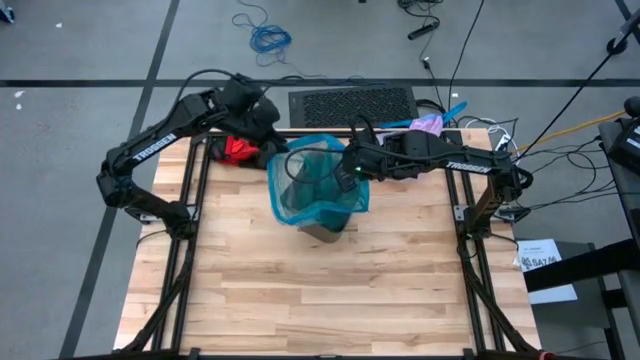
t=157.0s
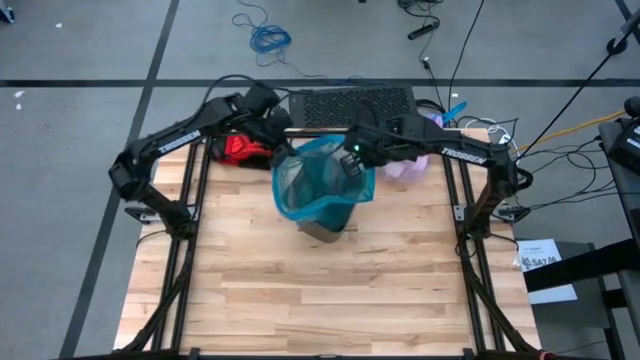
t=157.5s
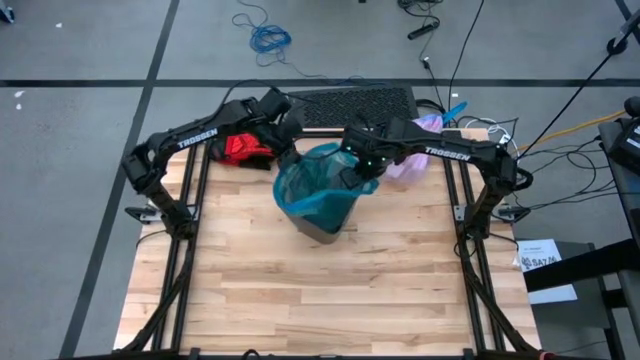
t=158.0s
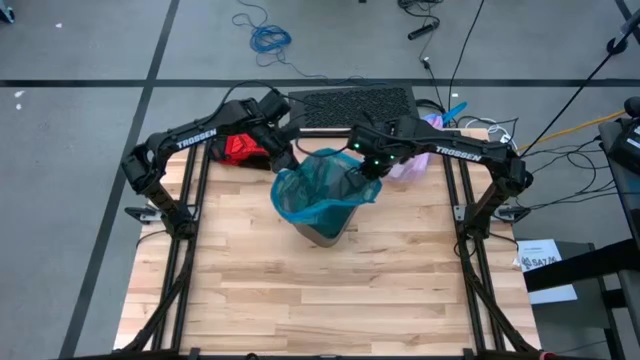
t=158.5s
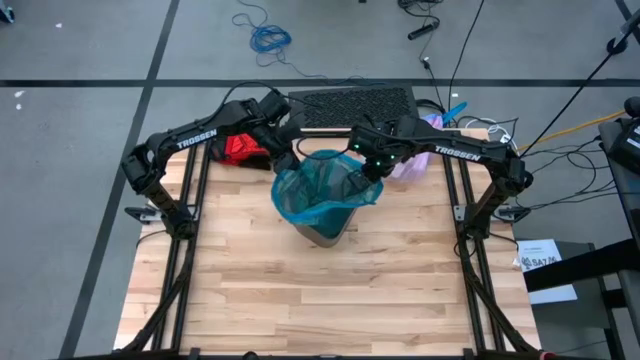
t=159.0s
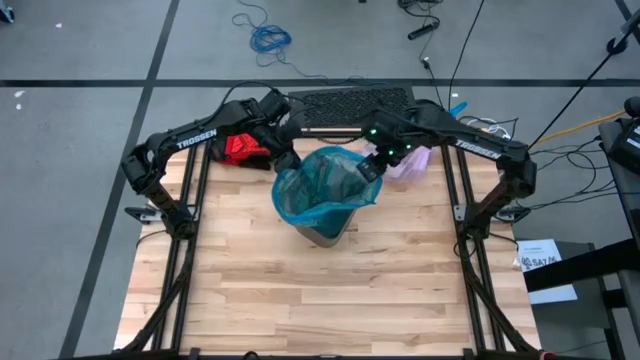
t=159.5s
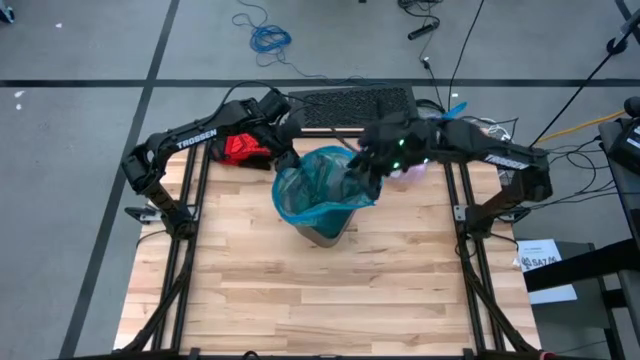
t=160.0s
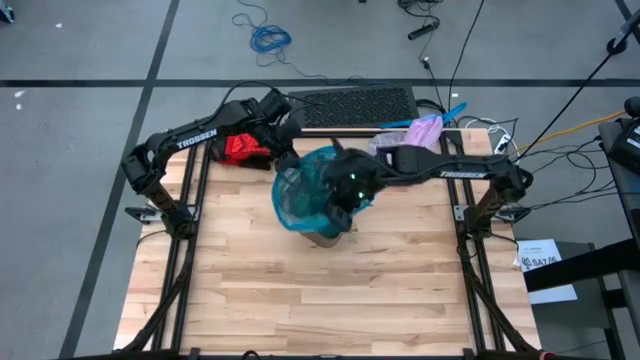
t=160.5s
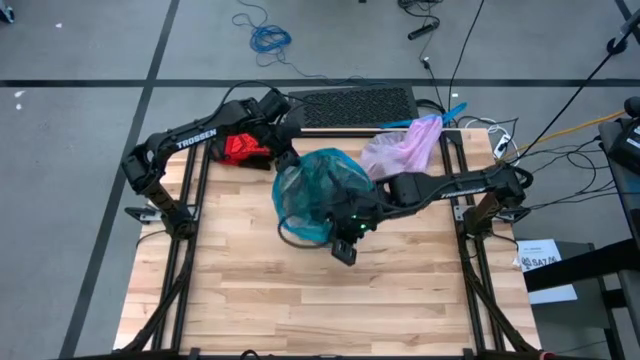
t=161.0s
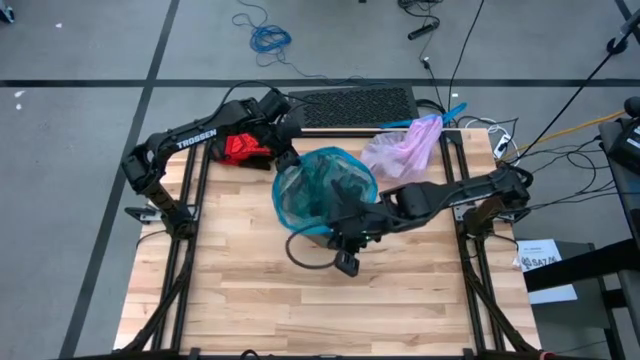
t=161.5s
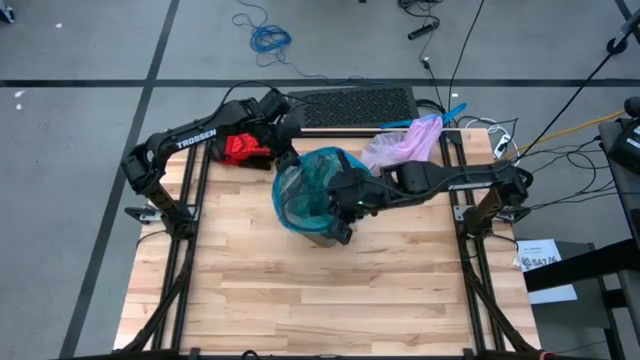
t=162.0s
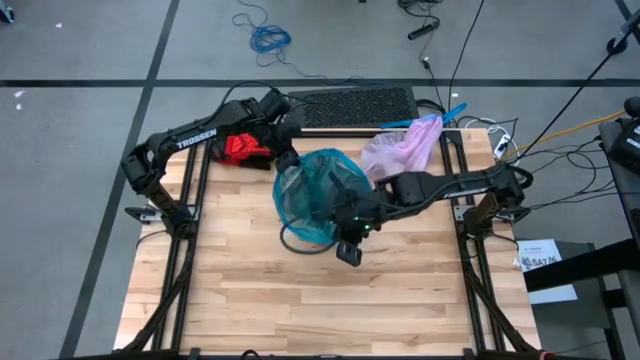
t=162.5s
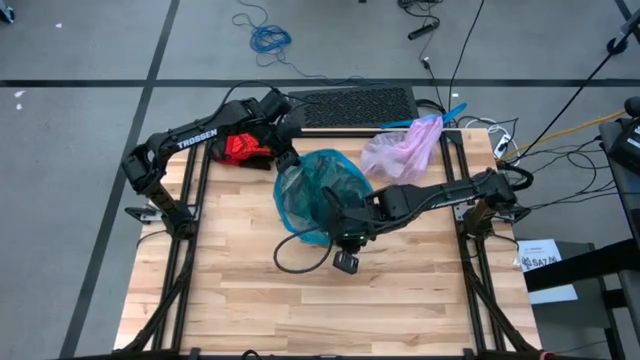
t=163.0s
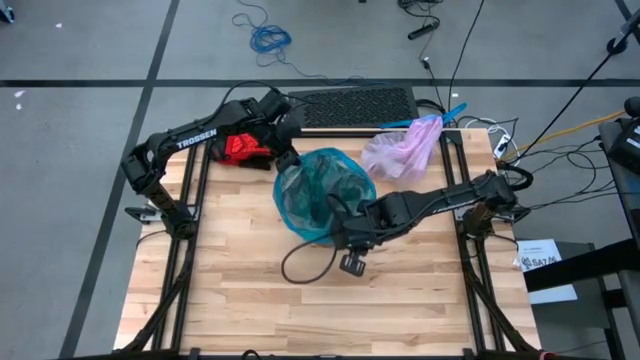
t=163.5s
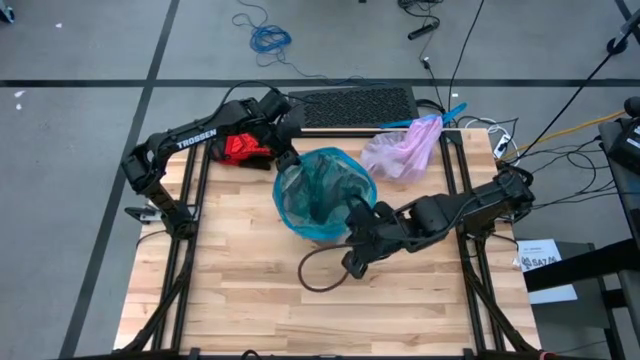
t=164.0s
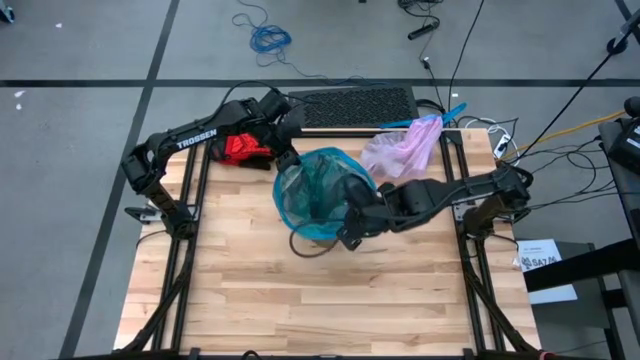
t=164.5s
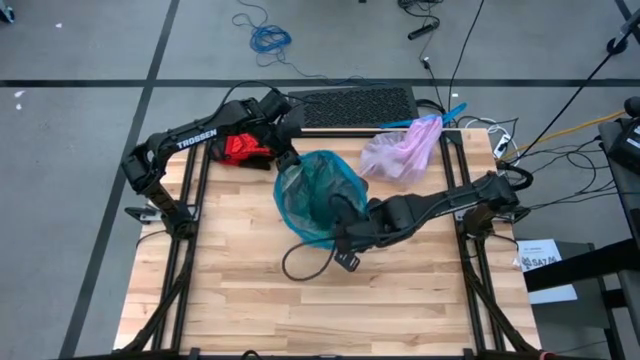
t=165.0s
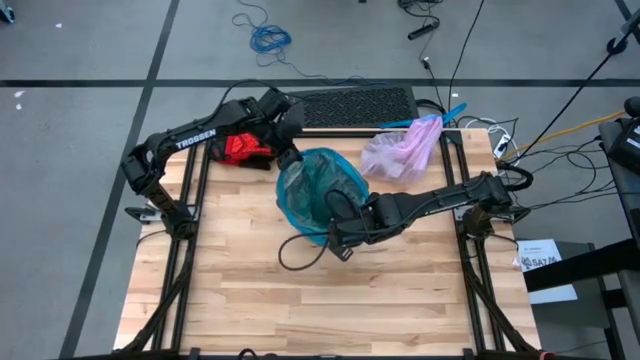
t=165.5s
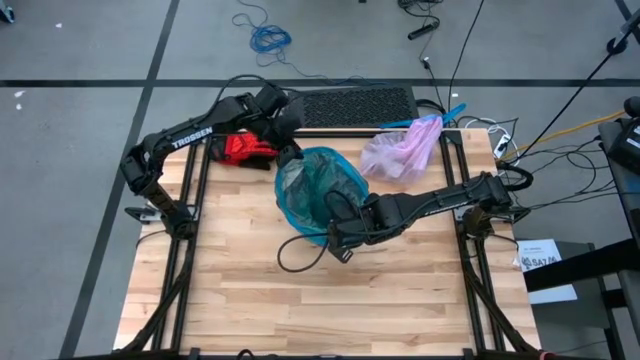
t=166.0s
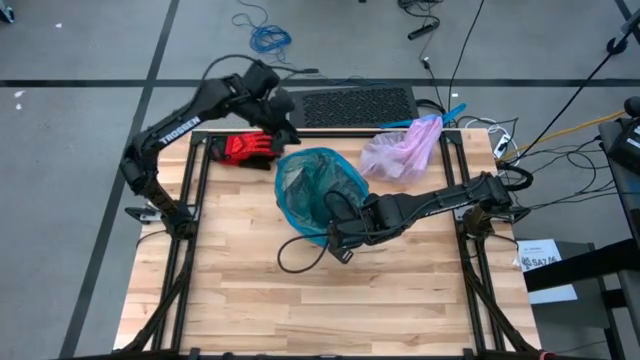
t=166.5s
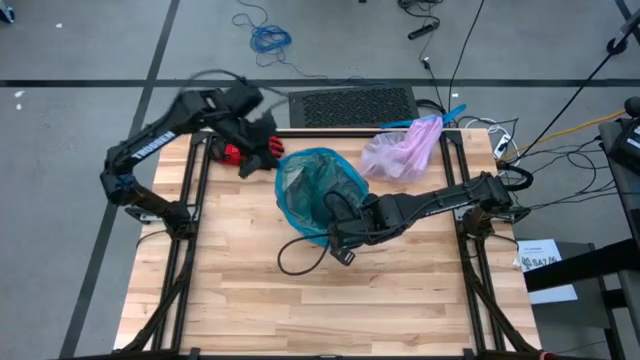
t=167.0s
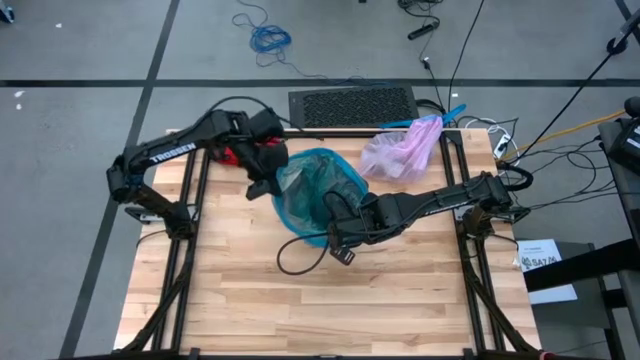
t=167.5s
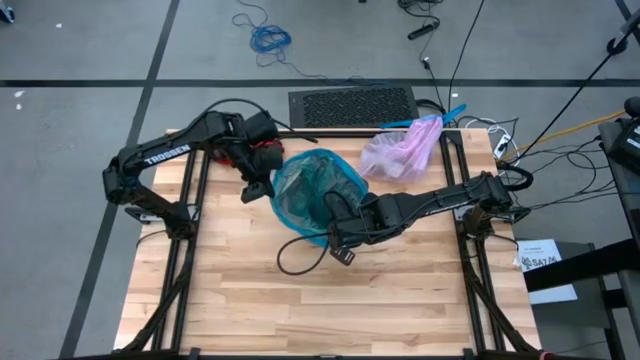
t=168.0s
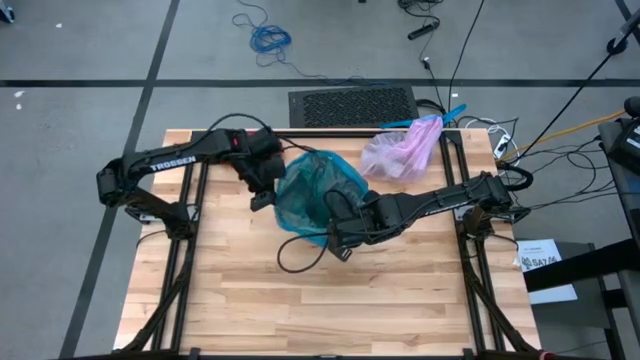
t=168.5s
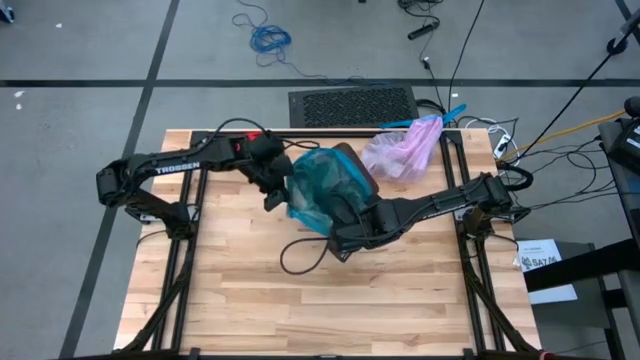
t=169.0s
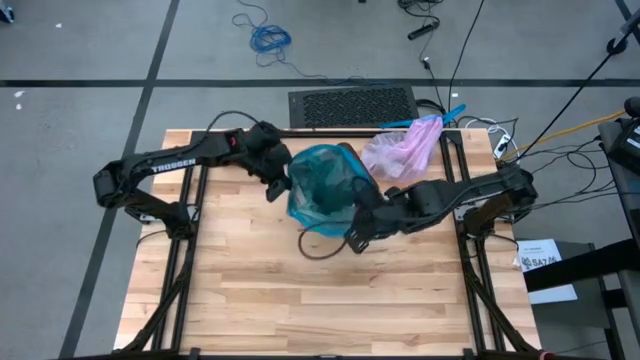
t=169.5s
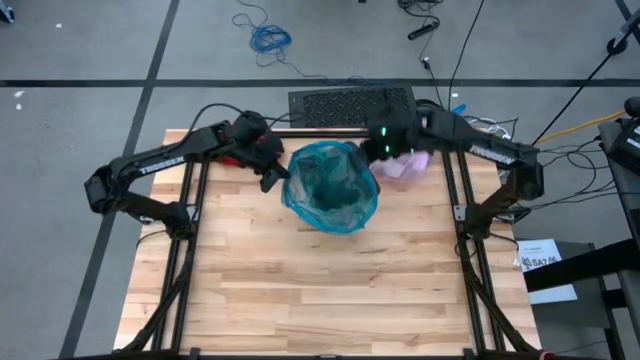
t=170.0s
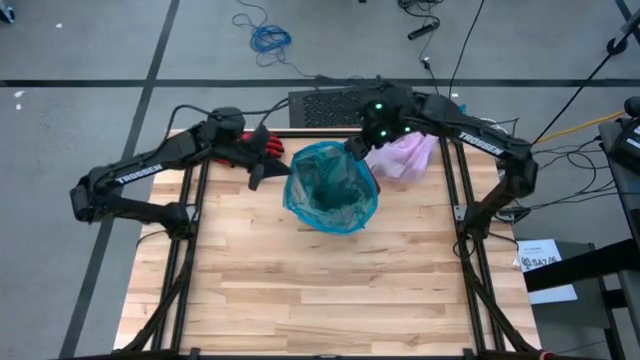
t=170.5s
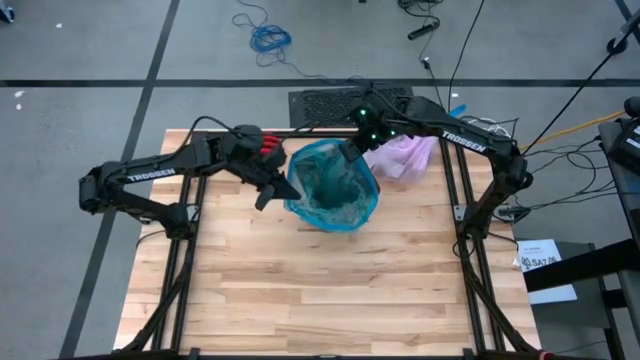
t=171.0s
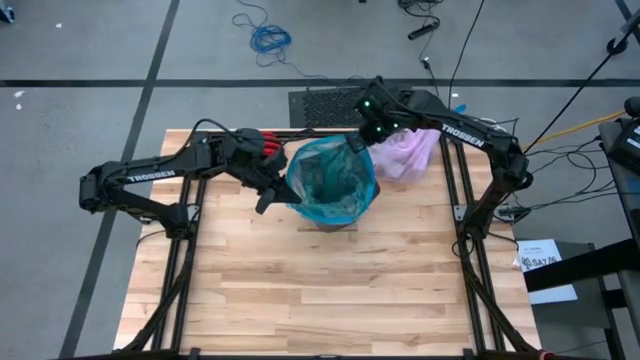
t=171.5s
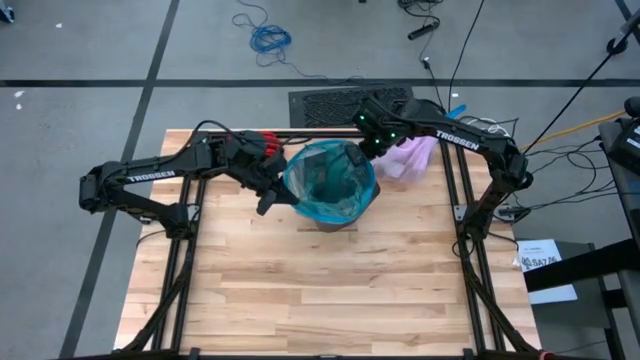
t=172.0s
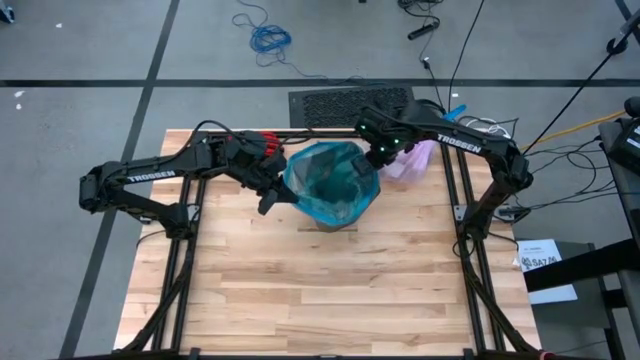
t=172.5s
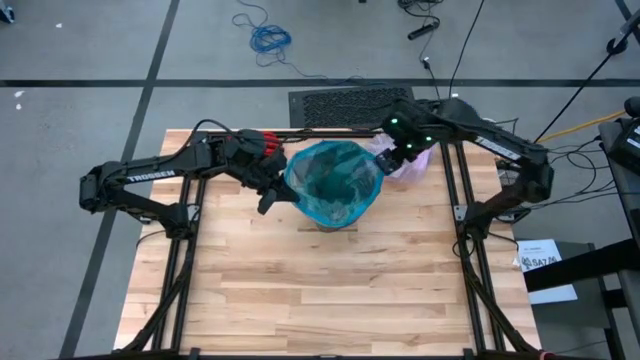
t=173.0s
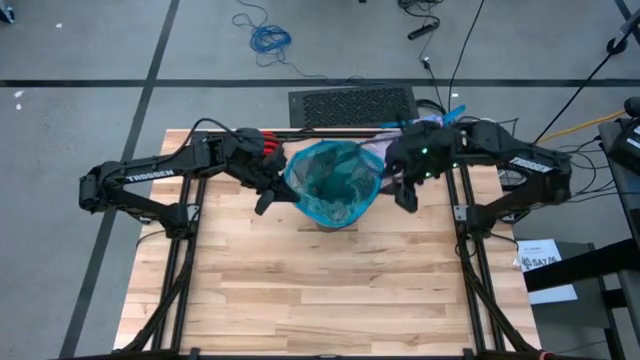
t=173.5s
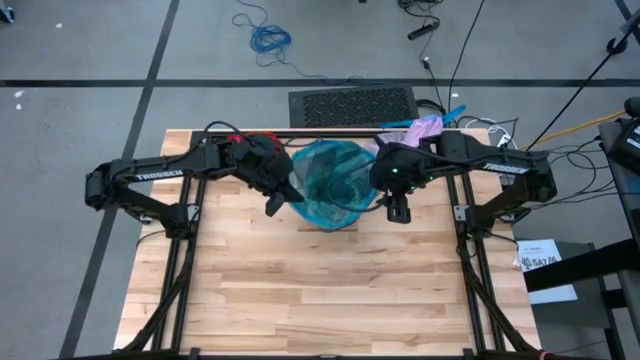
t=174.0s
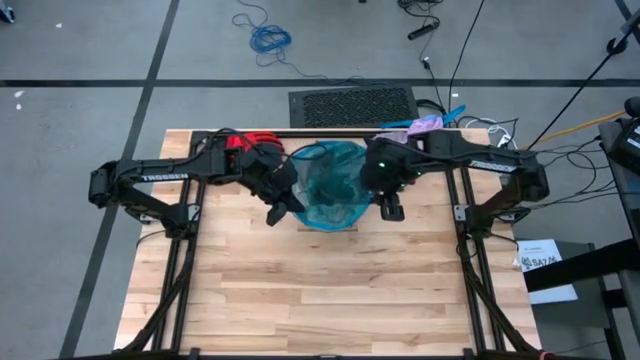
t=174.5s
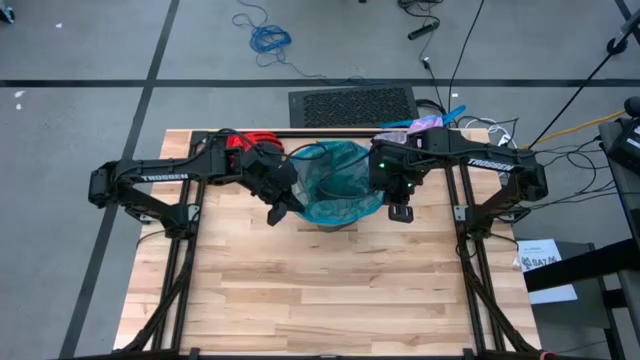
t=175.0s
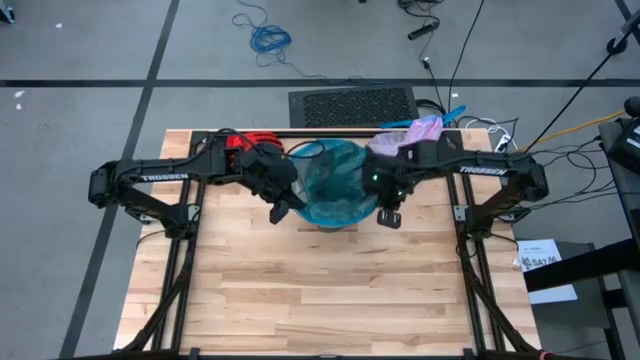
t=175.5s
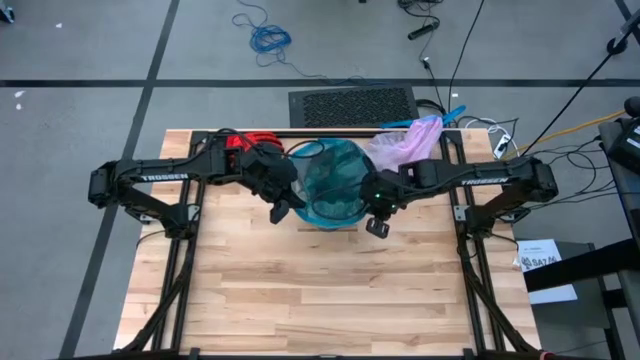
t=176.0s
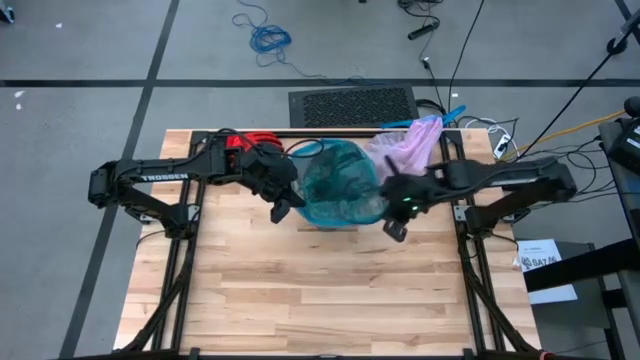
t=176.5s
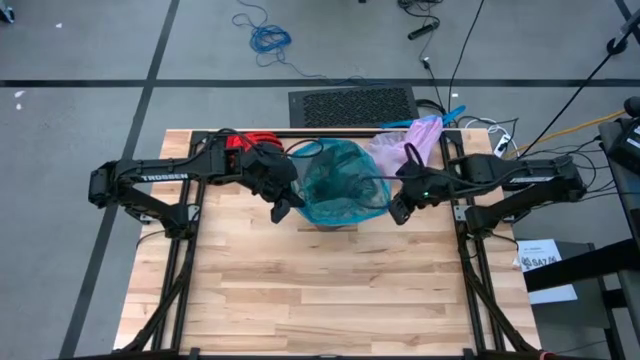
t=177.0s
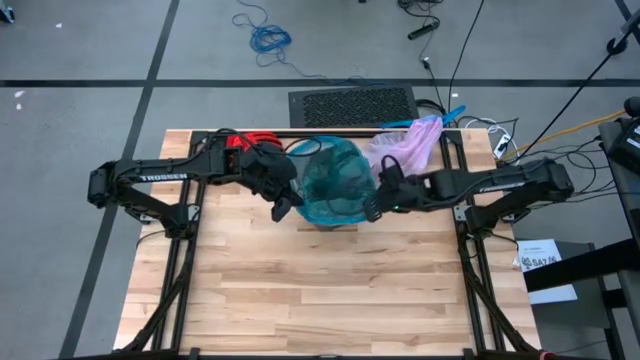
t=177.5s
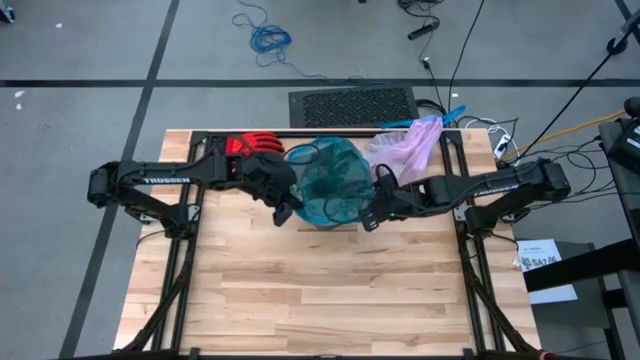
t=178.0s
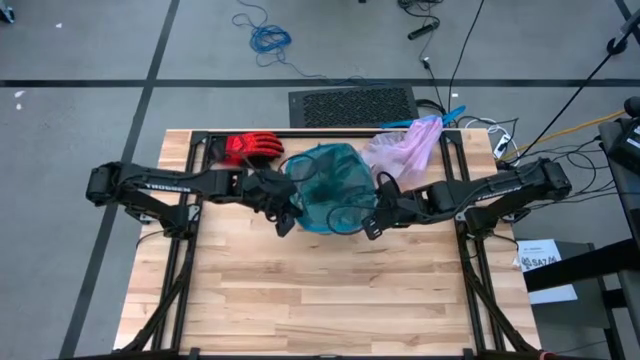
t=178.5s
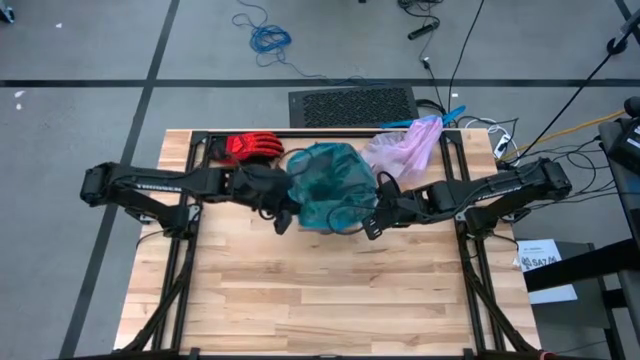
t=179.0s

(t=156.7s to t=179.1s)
Task: place trash/remove bag and relplace
Insert the new blue trash bag into the trash bin
